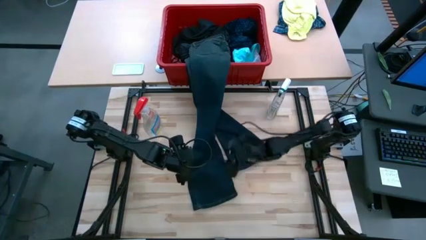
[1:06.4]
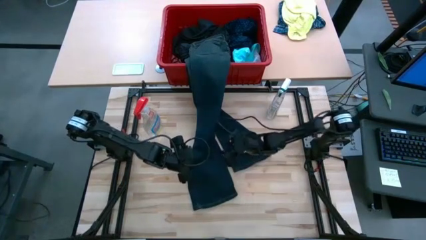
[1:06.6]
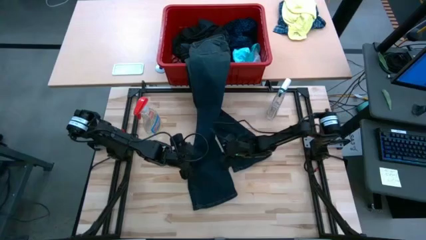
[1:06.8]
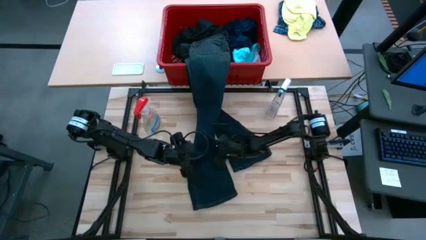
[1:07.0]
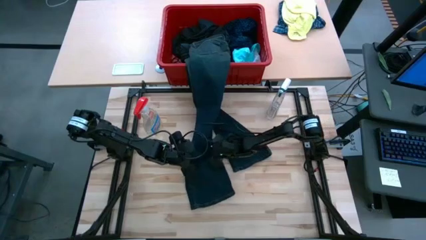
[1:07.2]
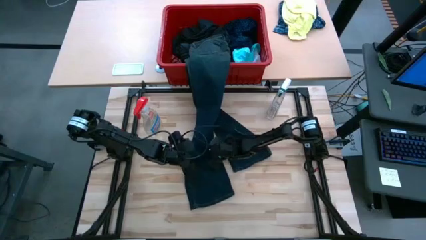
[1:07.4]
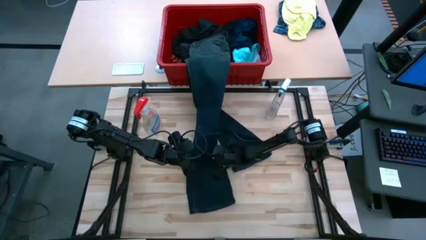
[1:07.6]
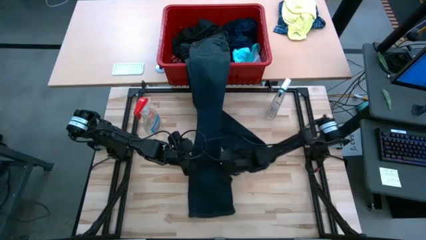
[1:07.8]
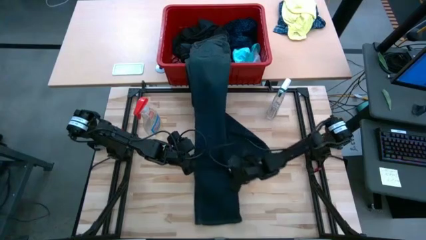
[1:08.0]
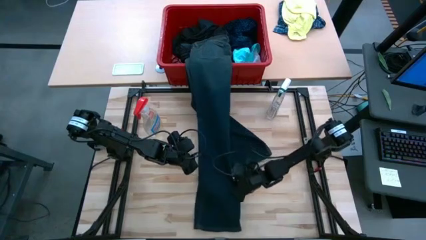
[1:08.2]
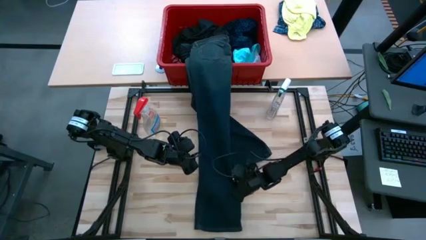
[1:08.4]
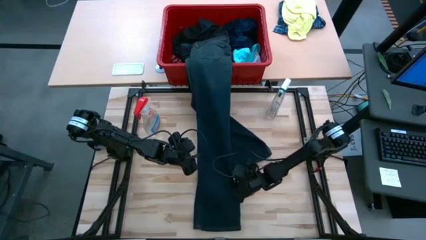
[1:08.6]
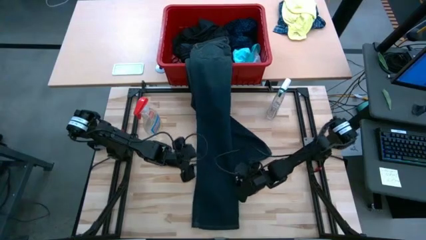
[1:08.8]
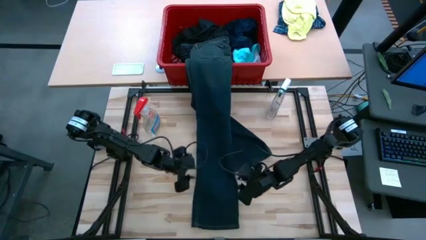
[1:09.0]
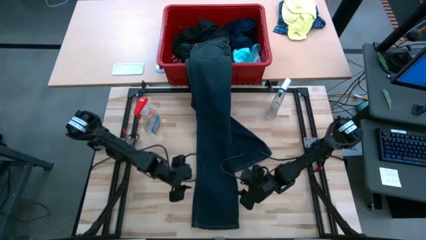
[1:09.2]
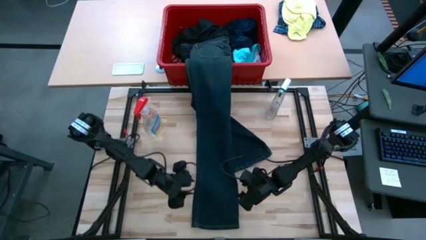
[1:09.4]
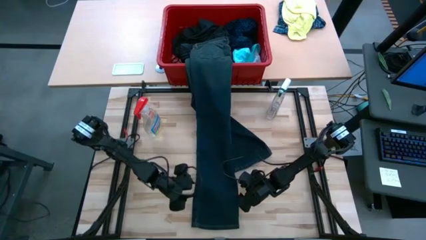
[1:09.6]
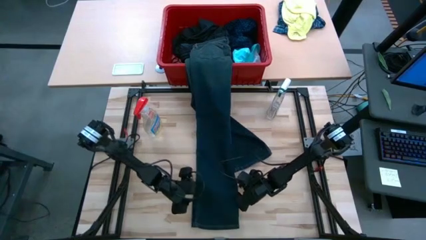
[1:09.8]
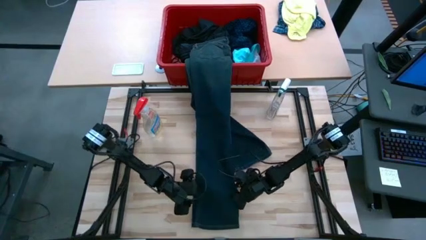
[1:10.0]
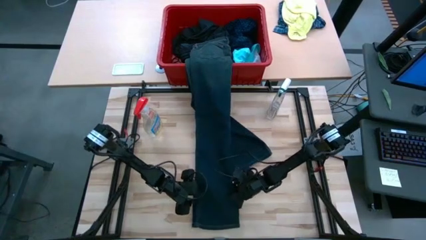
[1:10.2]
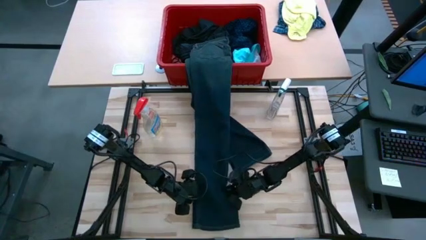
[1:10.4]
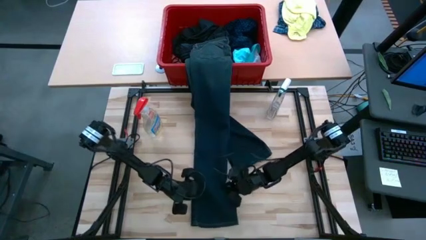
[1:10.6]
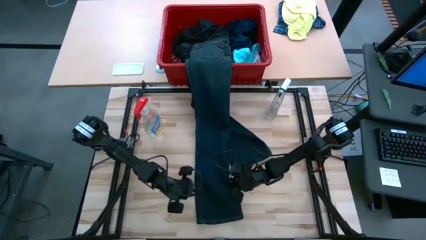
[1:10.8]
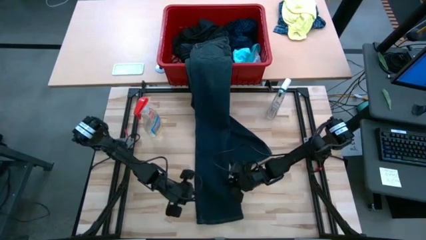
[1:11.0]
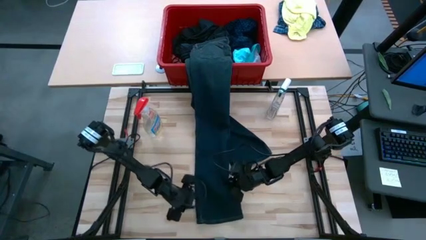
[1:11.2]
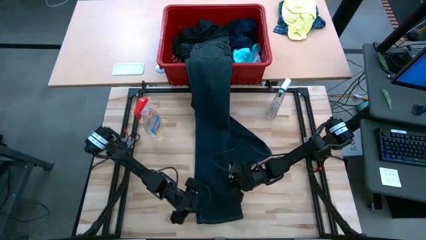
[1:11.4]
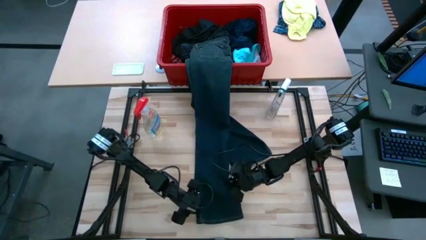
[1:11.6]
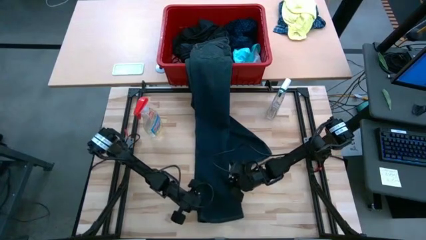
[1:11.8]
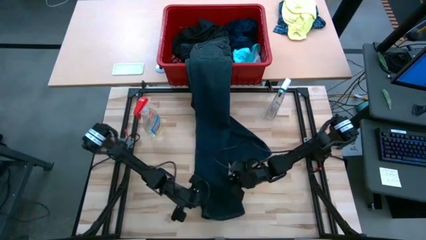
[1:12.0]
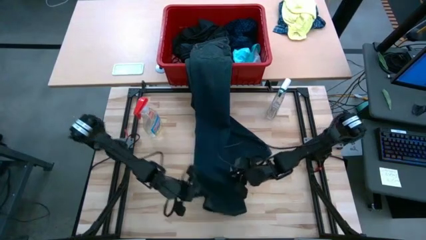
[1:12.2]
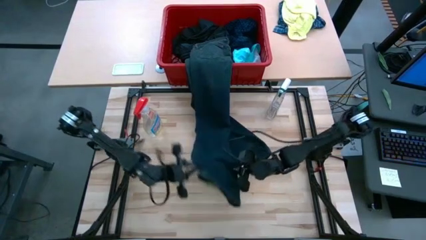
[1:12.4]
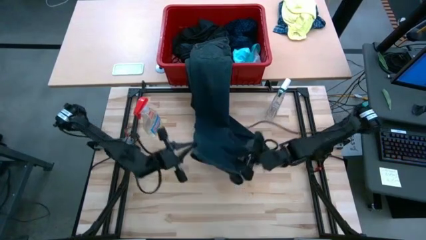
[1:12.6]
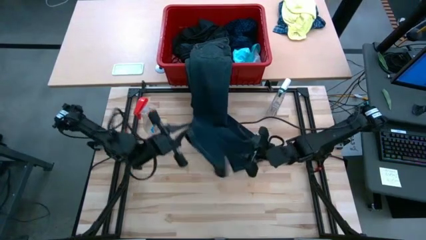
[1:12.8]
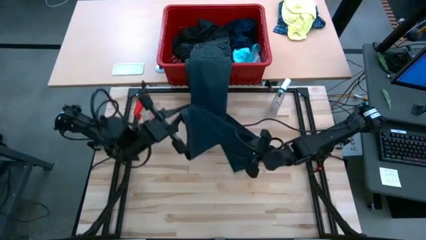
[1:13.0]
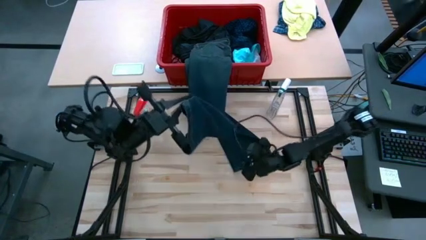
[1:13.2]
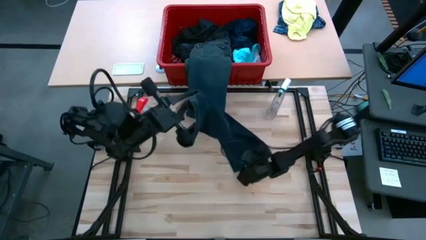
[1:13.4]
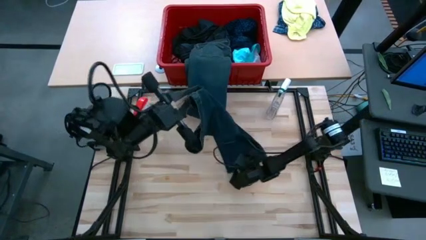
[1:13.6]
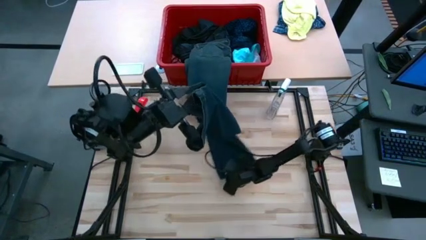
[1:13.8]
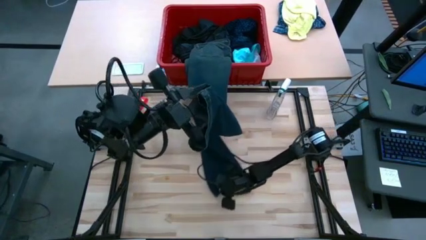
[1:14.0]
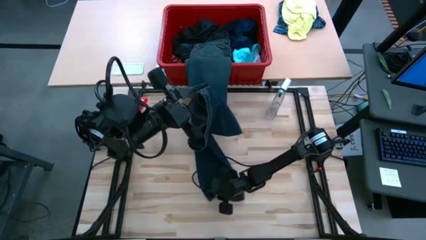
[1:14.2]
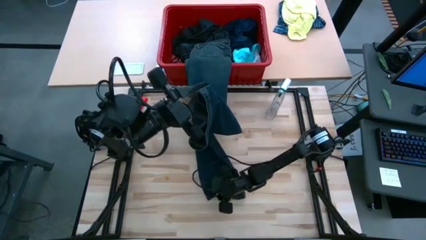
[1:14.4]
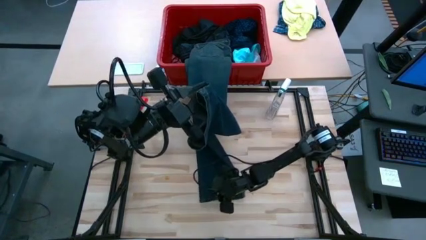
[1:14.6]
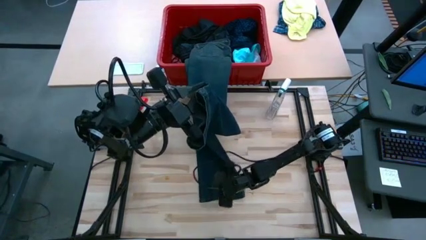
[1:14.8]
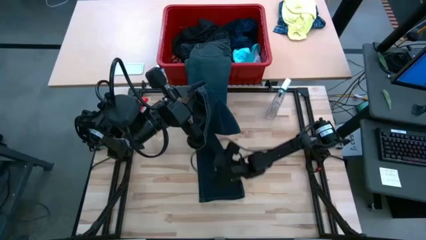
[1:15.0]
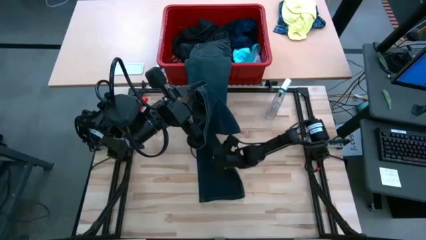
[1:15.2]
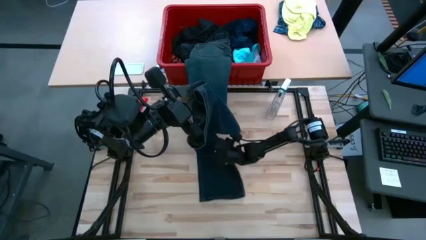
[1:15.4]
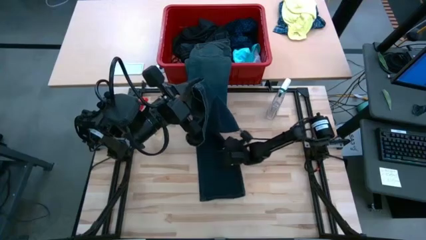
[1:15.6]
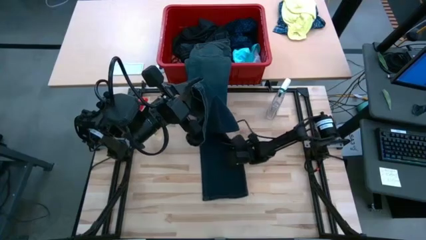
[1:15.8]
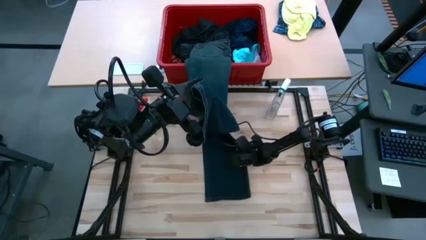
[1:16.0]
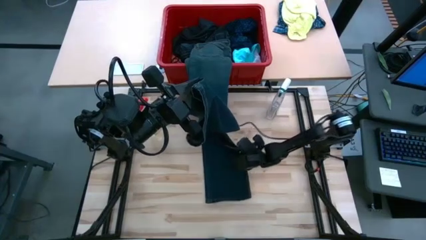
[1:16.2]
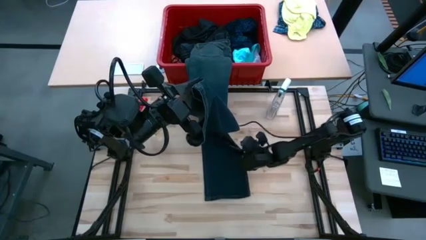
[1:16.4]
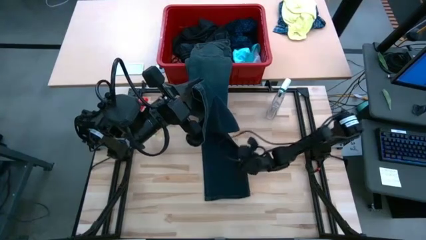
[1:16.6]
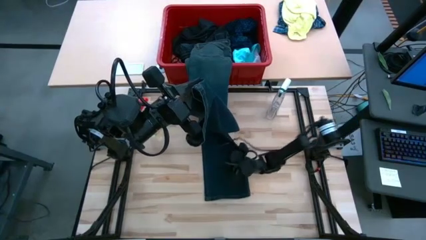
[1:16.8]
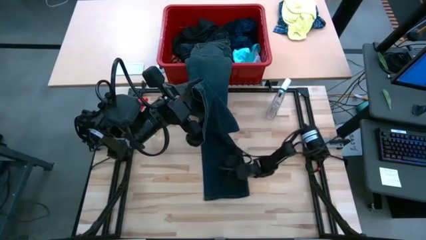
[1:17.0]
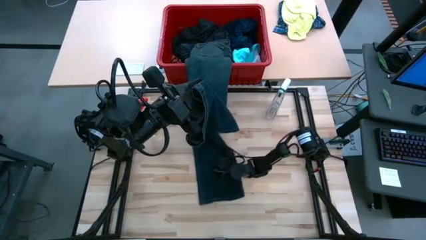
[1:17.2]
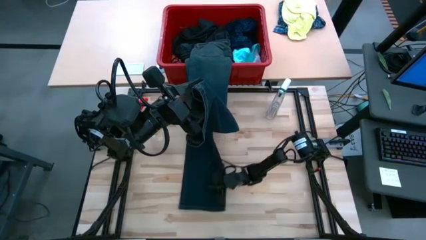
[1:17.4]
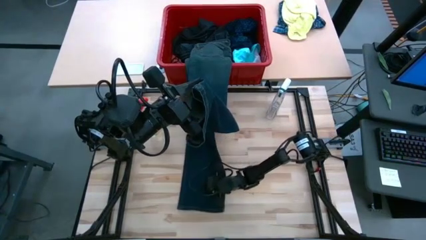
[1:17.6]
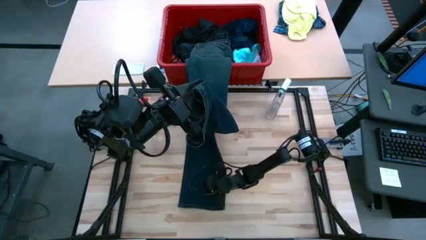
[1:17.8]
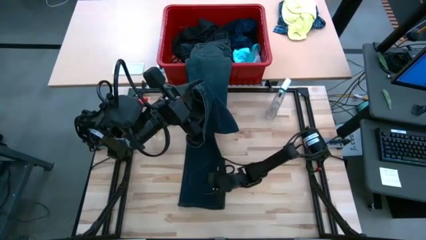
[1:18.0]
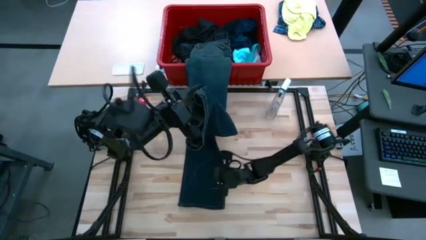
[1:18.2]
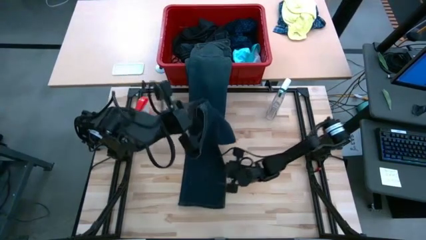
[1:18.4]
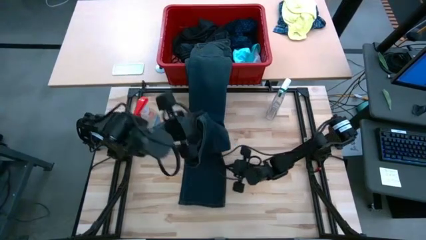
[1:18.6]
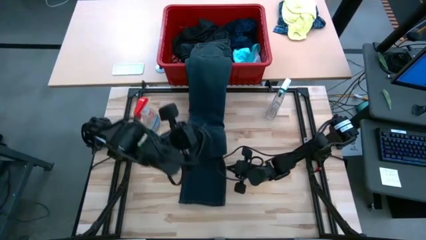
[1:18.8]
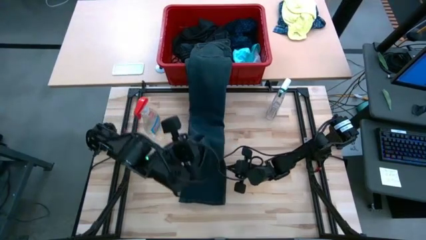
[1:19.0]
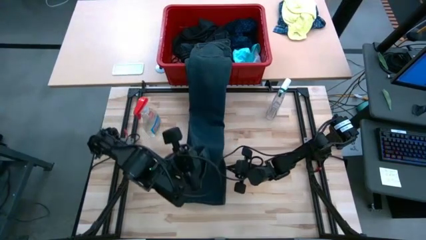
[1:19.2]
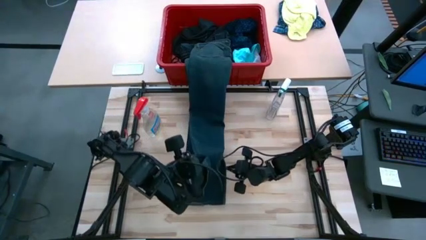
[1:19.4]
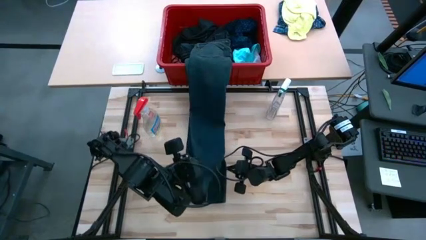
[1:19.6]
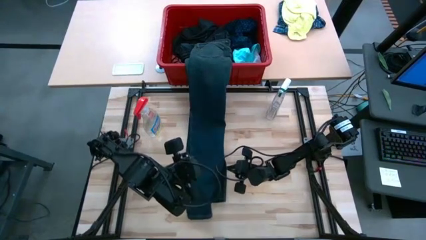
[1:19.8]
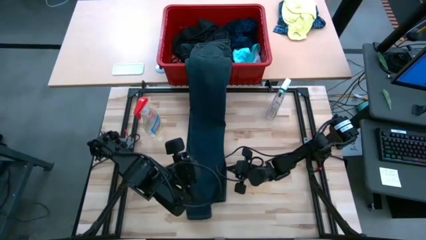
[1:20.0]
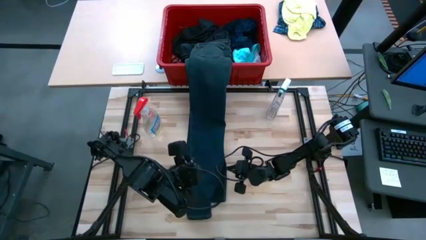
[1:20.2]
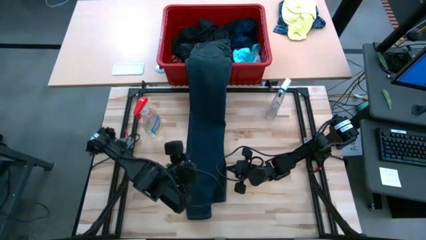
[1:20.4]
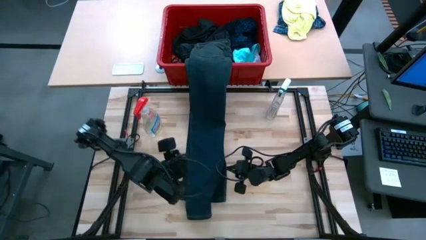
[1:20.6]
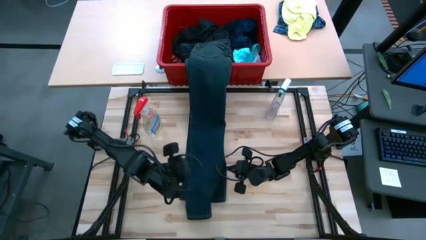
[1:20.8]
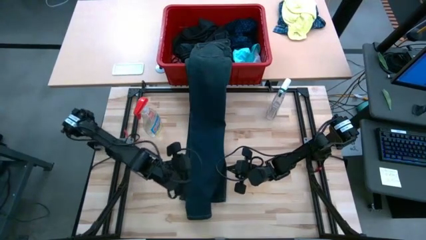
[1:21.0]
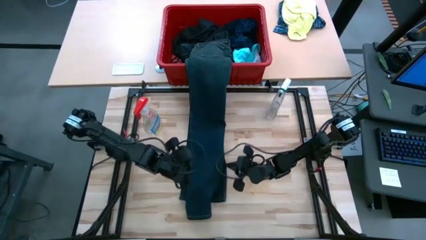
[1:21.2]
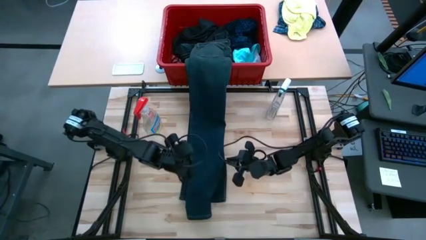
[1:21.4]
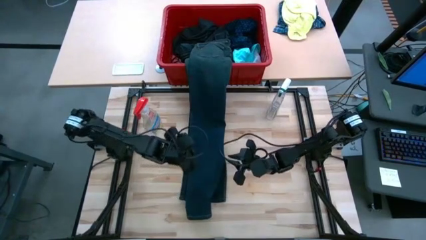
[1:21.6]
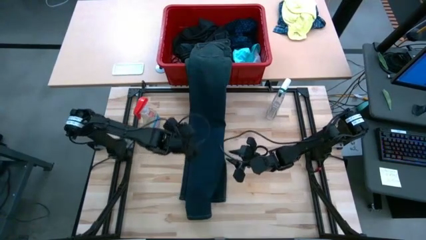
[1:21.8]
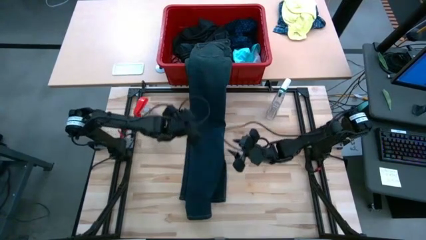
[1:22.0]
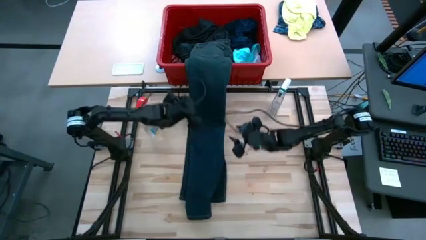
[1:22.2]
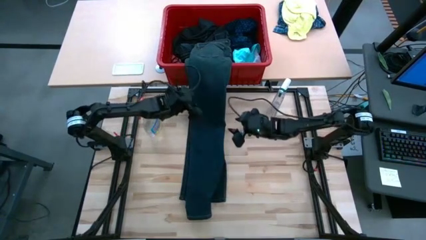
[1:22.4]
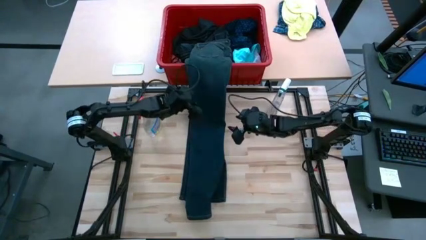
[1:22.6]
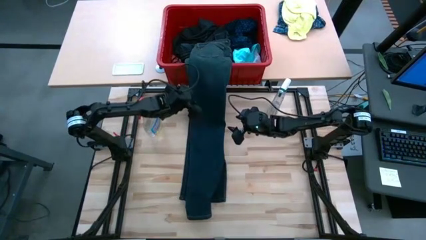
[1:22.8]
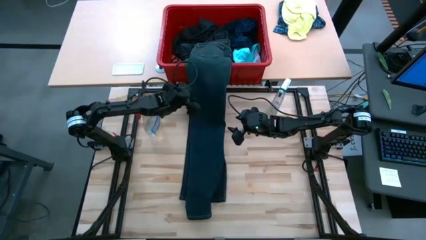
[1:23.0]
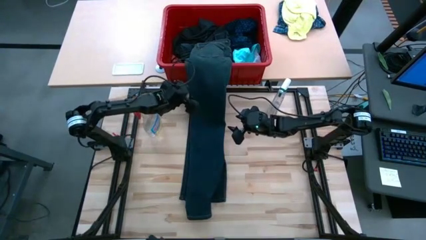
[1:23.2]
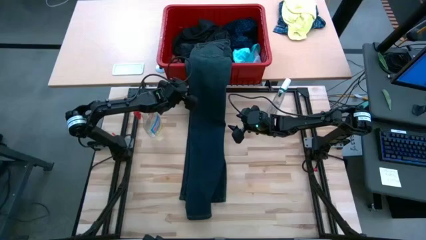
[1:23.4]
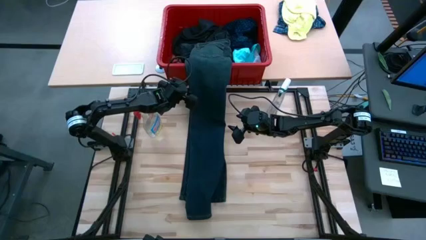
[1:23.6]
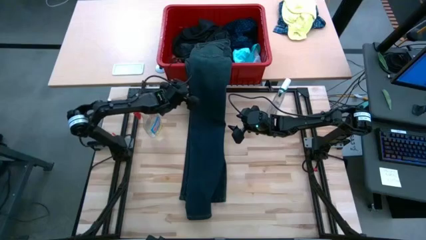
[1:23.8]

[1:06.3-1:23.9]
Task: Fold Laundry from Bin
Fold the blue pants
